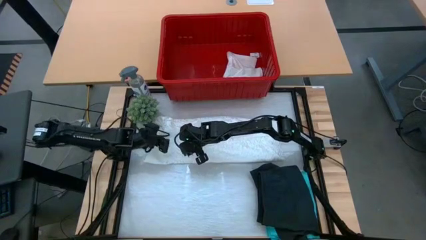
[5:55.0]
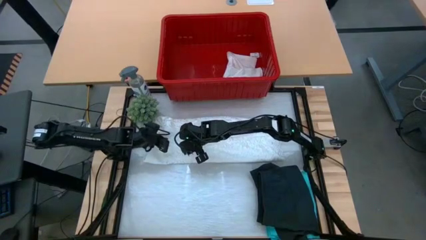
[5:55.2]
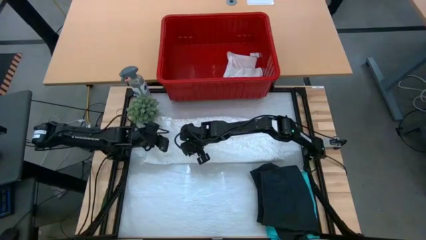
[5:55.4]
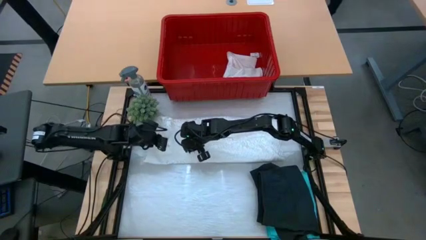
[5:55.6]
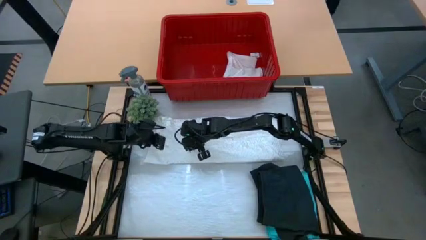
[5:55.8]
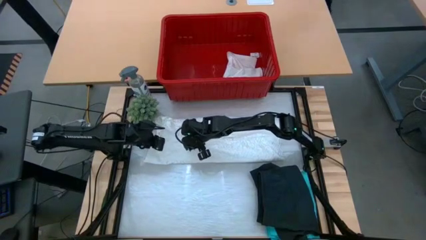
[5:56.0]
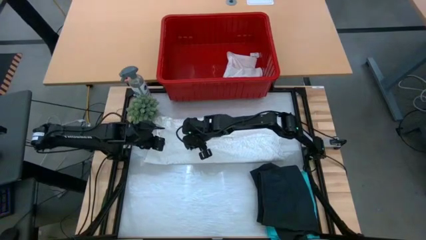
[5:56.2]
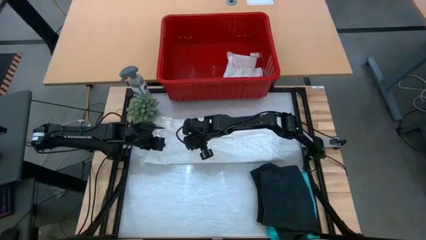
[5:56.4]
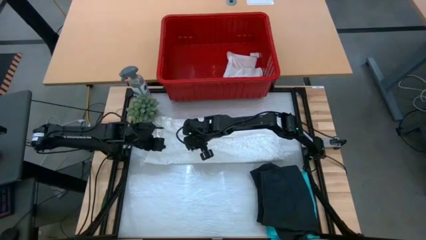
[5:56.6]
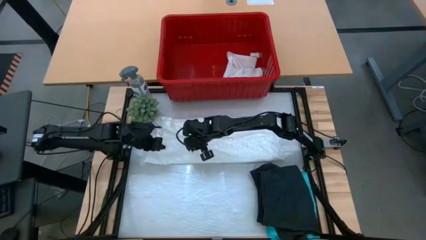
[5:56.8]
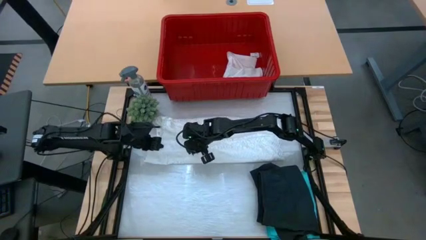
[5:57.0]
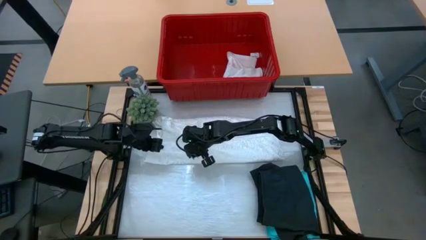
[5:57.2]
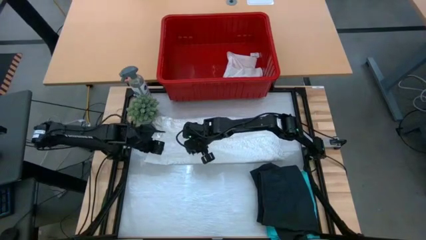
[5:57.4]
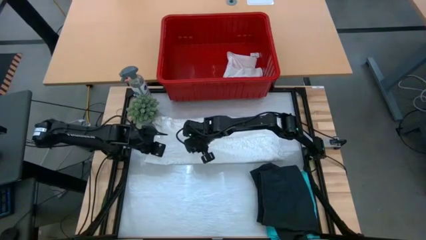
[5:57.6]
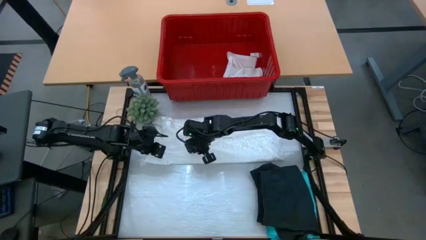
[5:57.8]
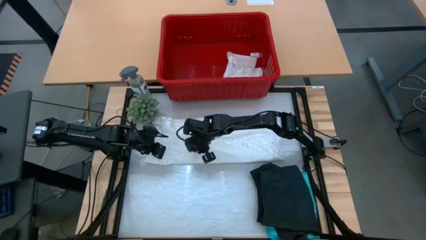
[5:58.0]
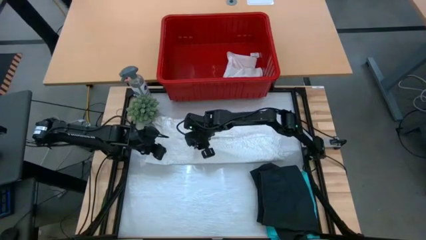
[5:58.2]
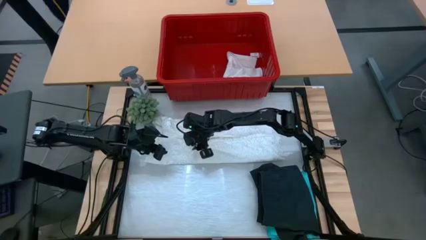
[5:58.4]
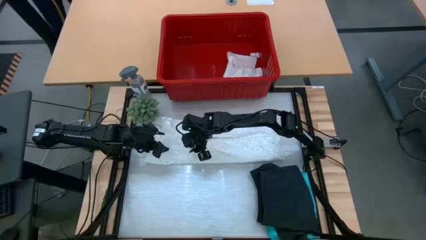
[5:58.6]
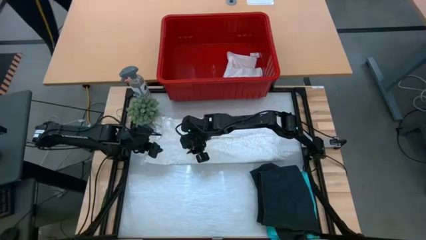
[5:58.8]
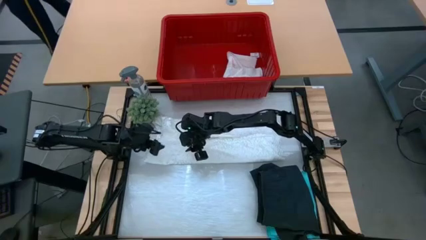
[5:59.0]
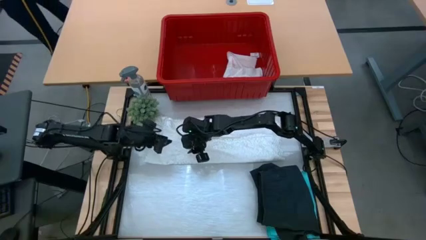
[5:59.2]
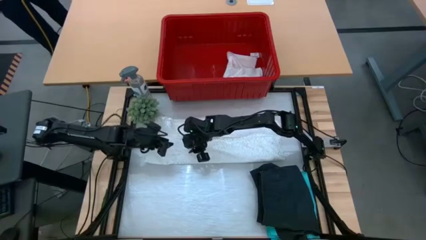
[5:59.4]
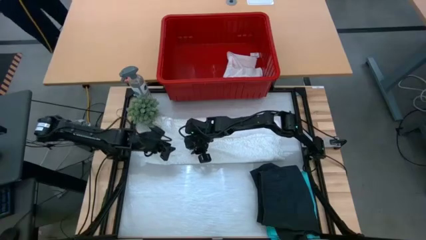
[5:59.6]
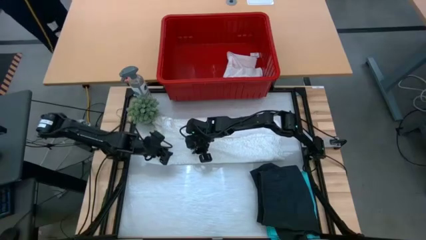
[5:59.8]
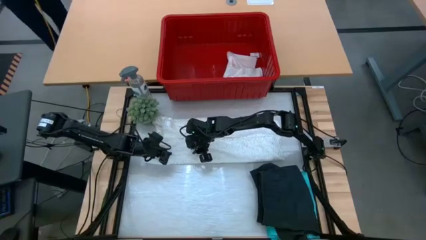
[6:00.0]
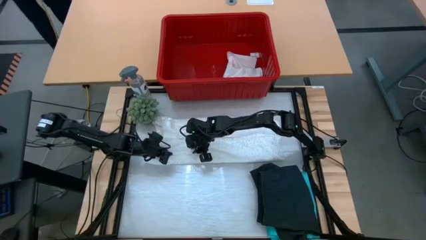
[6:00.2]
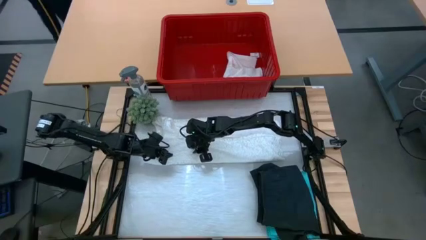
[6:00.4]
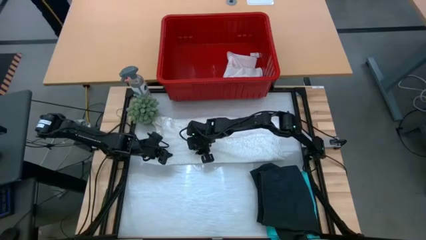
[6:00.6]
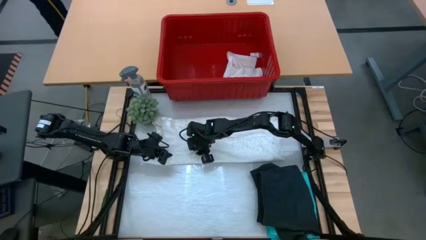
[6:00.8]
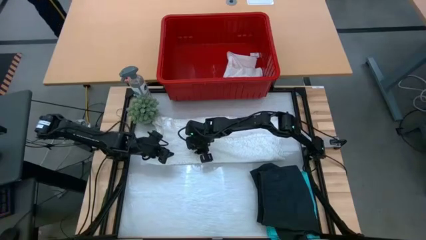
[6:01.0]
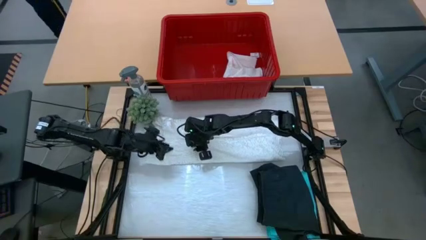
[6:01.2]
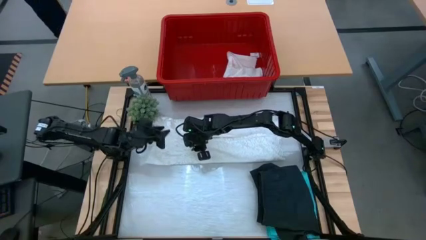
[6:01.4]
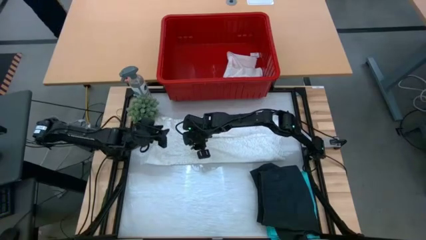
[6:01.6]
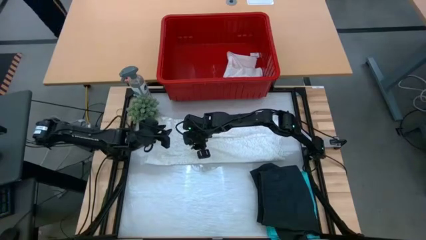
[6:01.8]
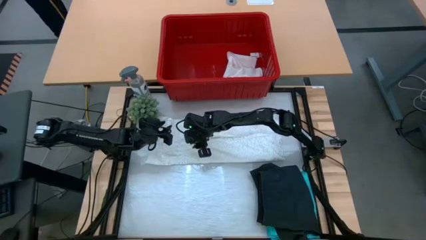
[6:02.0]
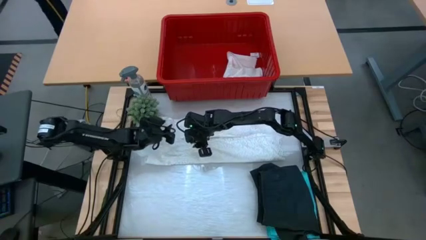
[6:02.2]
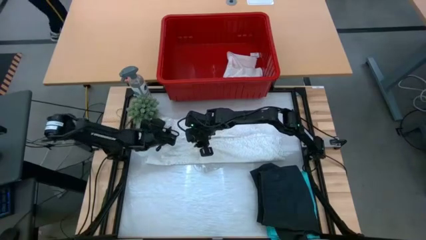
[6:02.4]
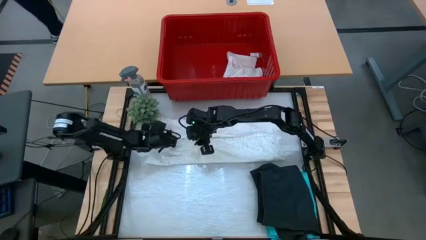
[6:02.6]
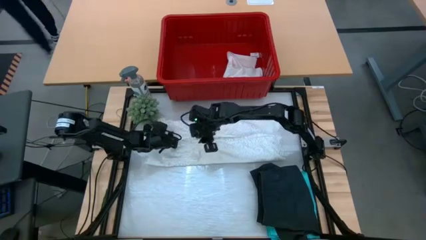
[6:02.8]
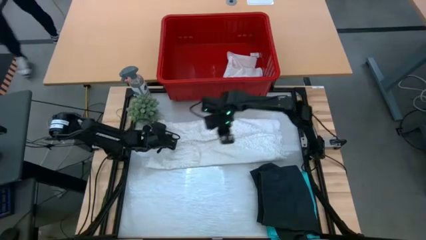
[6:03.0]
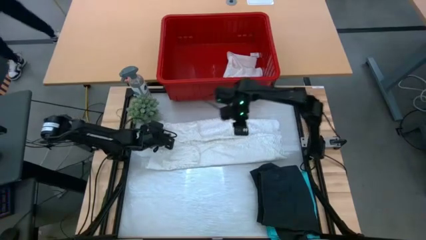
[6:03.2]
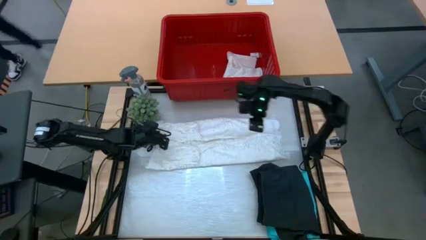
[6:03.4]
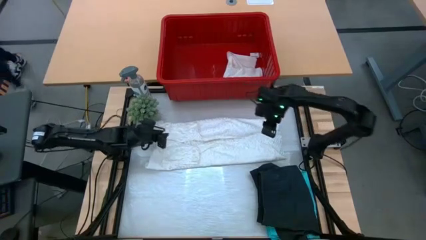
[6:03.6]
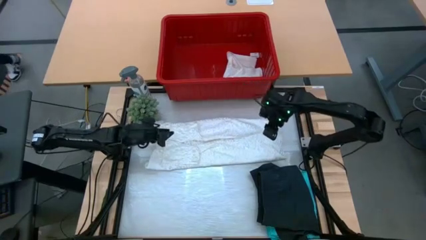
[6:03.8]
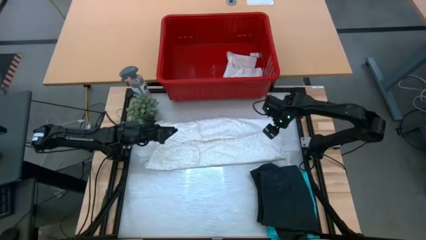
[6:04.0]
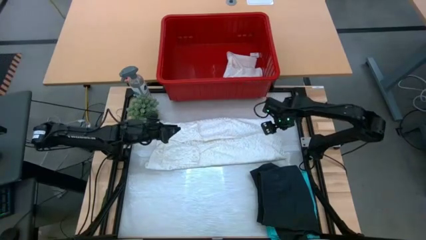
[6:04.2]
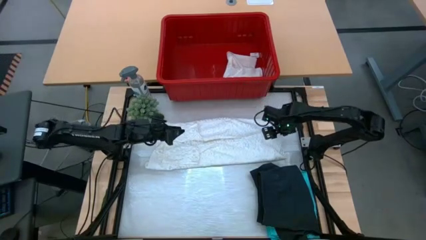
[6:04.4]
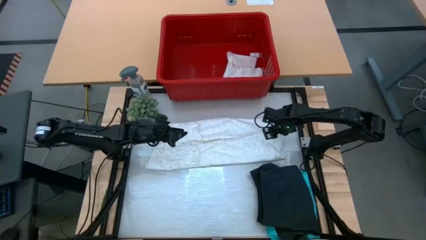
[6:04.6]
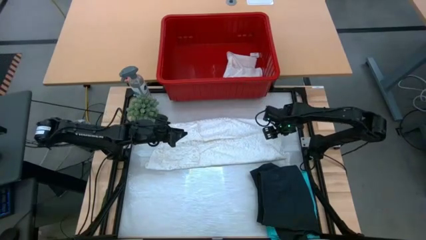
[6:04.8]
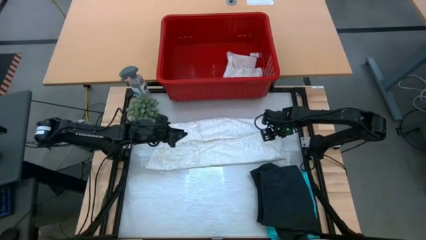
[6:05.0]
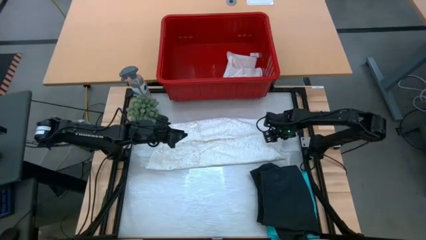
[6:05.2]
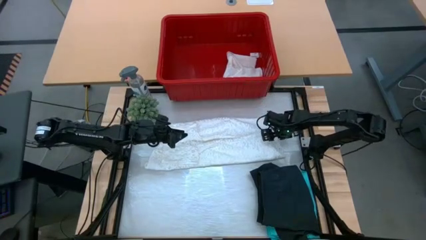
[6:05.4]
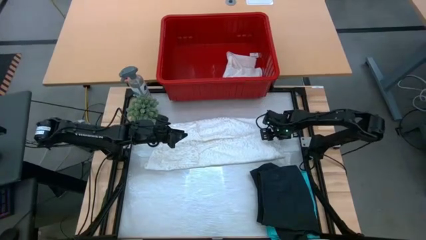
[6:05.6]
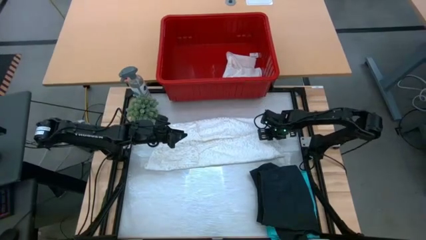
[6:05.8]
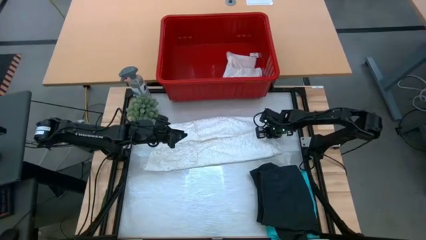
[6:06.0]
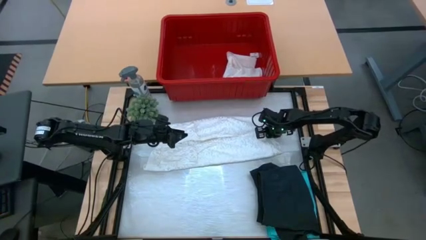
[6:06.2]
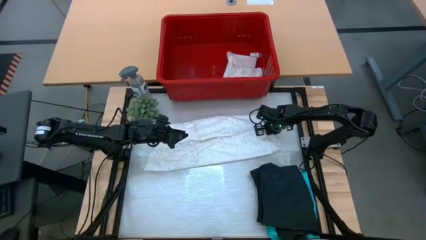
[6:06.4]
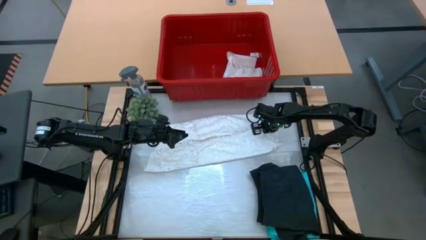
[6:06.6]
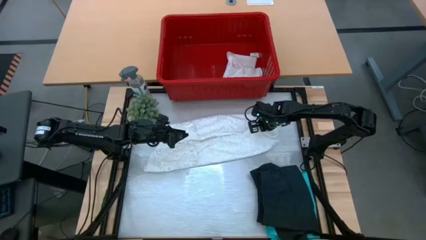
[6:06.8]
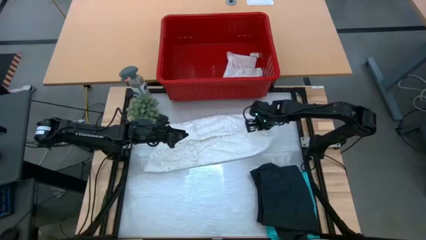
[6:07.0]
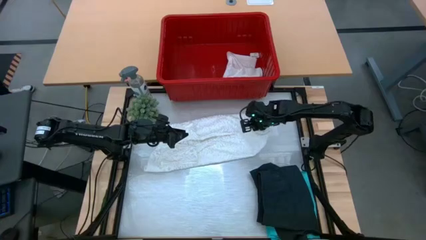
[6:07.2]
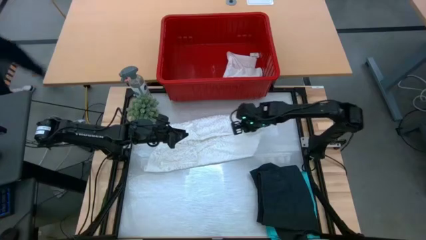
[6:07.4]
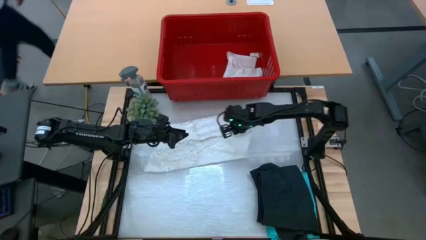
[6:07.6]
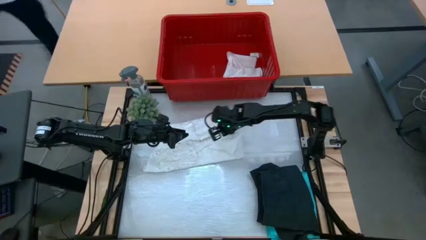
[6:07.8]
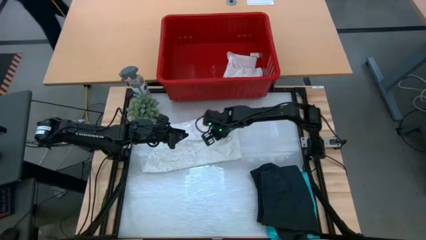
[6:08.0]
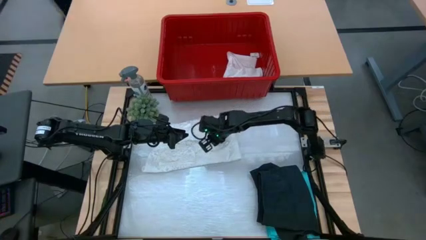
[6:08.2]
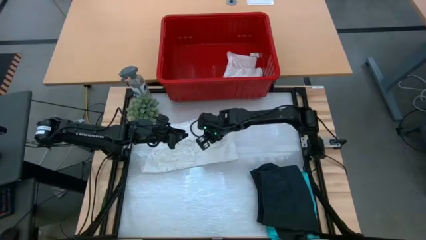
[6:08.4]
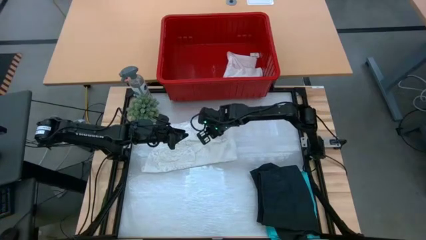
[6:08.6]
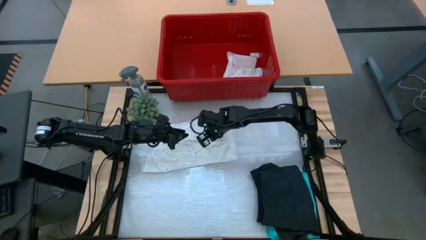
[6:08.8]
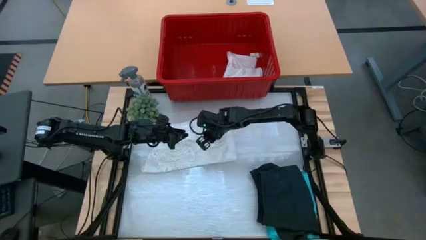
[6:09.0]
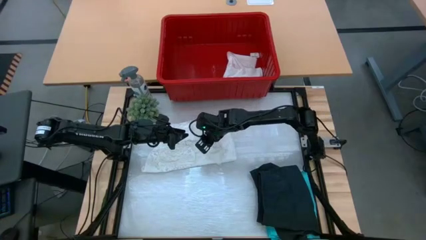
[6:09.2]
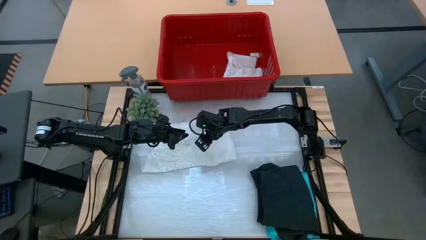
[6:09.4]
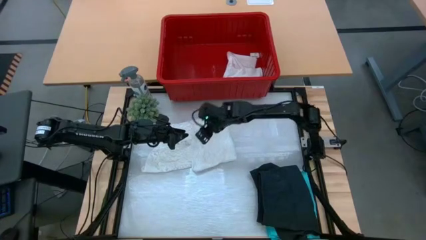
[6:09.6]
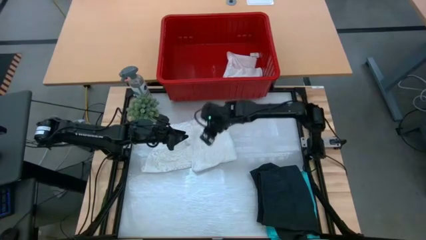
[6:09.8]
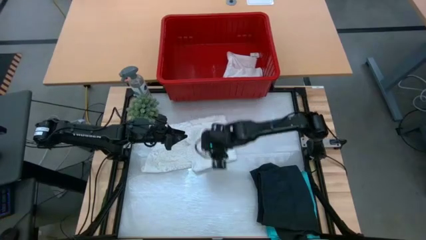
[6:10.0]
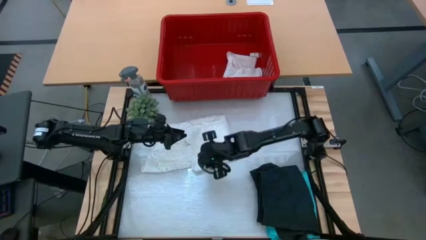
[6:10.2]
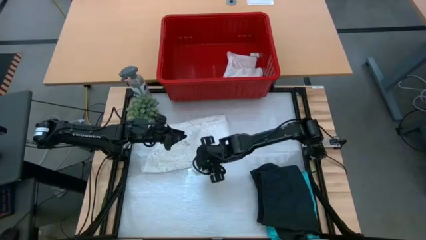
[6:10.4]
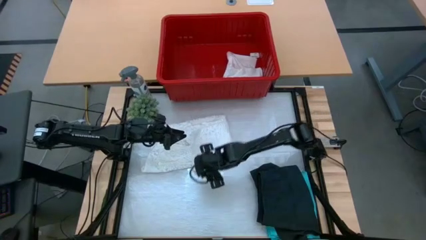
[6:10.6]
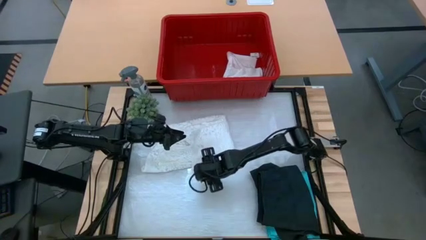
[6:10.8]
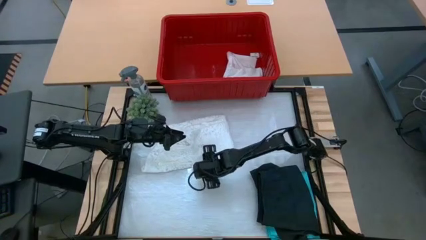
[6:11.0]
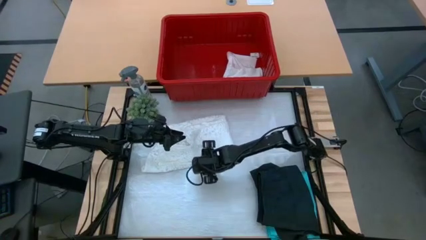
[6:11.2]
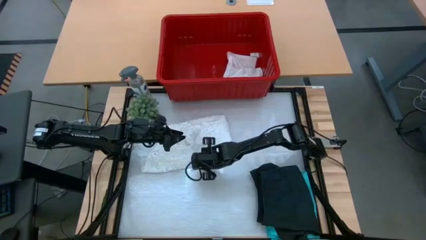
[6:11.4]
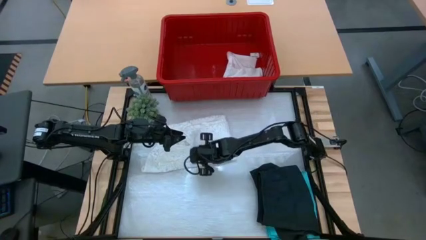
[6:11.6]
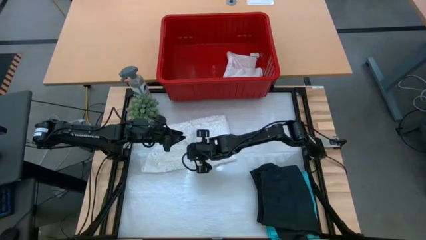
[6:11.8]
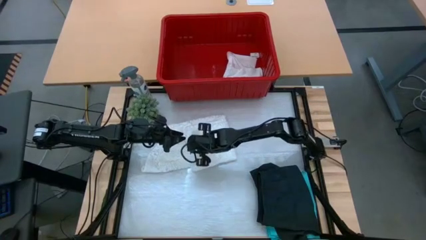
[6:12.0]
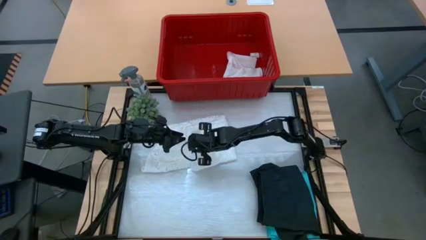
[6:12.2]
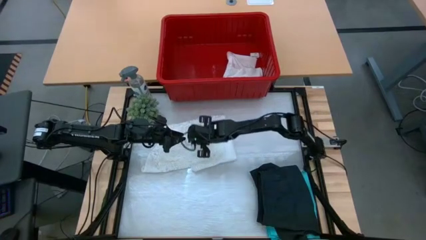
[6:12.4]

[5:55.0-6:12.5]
Task: Fold Laundry from Bin
Fold the white t-shirt
